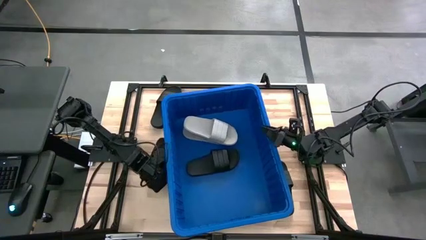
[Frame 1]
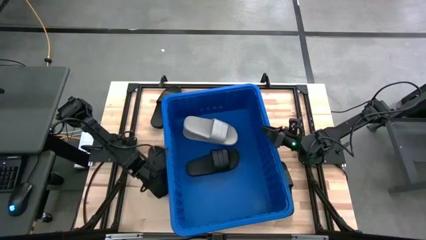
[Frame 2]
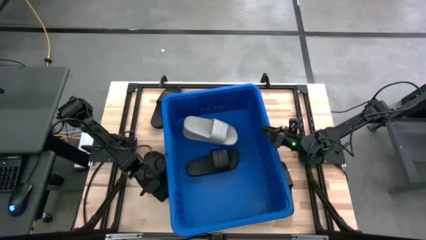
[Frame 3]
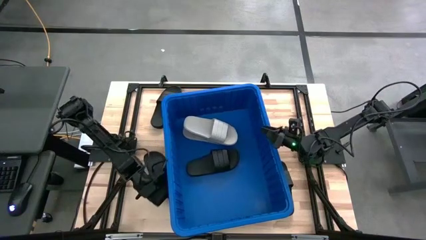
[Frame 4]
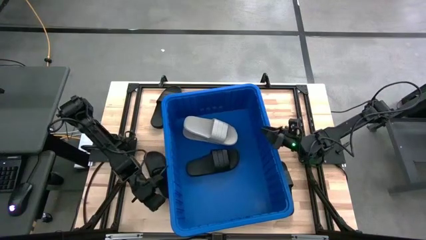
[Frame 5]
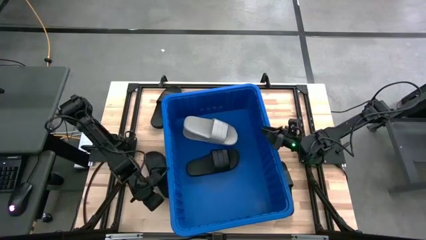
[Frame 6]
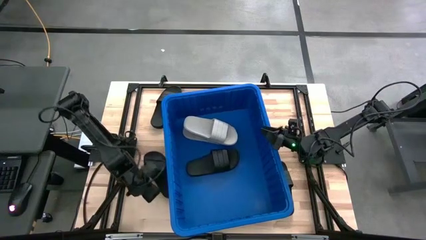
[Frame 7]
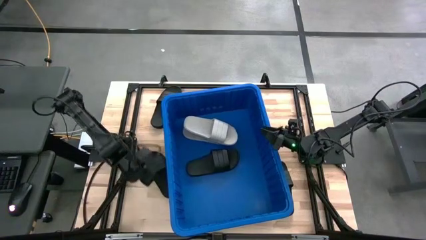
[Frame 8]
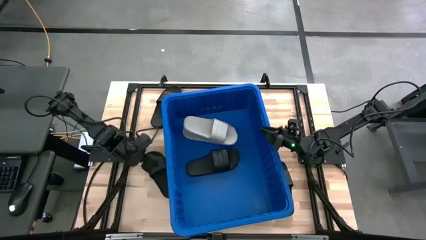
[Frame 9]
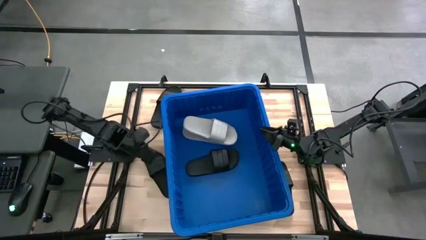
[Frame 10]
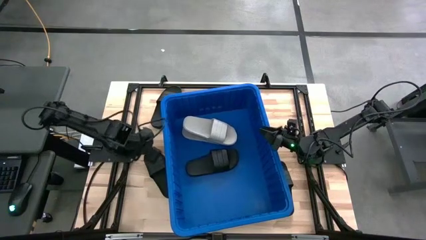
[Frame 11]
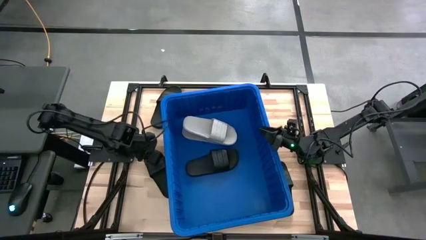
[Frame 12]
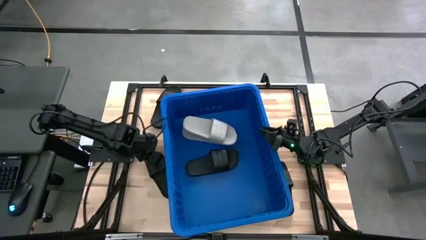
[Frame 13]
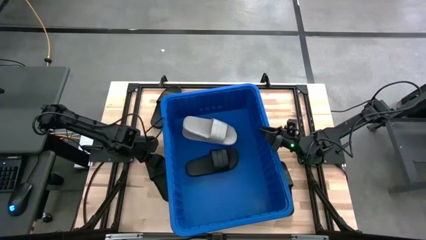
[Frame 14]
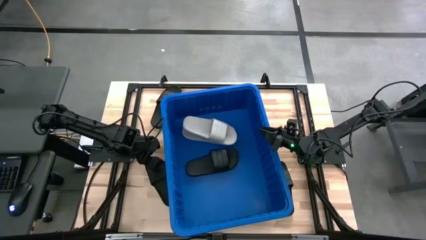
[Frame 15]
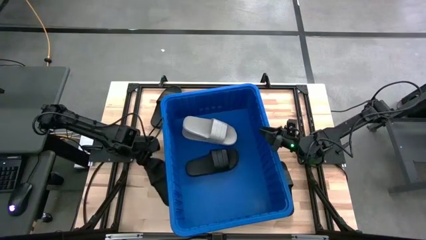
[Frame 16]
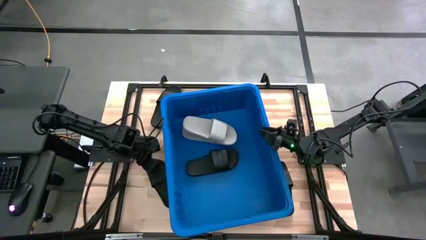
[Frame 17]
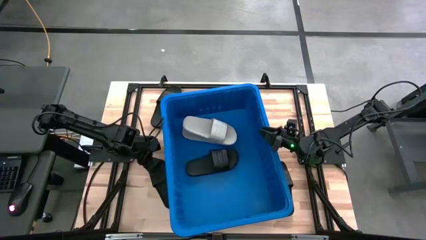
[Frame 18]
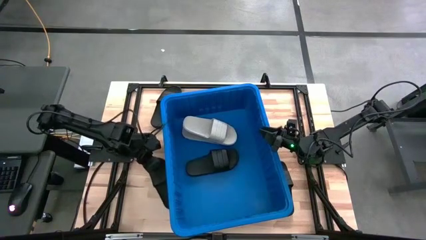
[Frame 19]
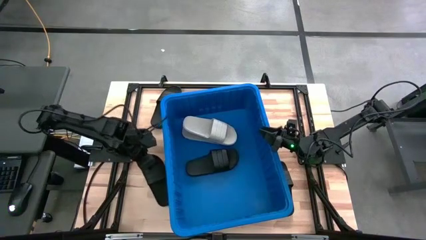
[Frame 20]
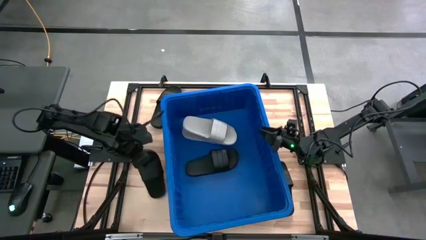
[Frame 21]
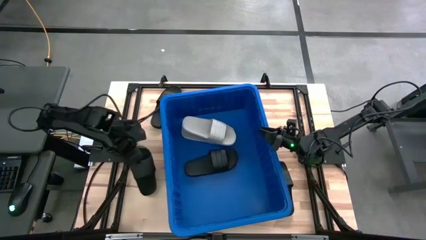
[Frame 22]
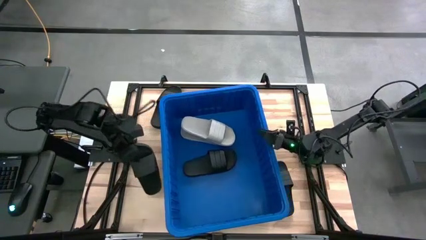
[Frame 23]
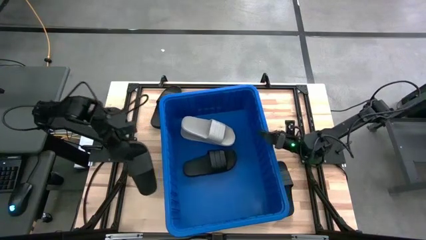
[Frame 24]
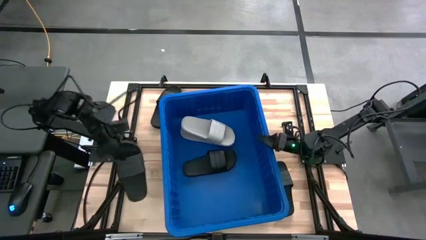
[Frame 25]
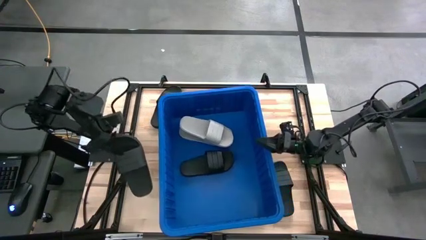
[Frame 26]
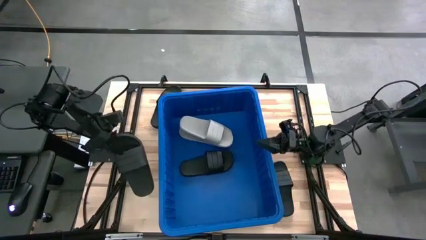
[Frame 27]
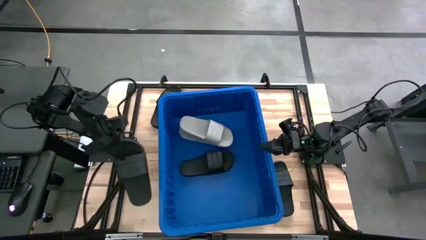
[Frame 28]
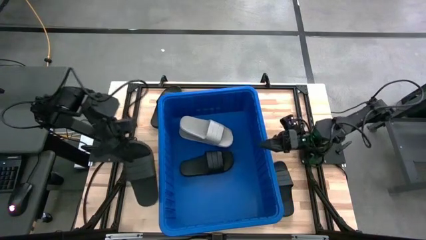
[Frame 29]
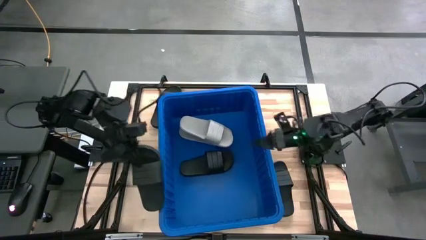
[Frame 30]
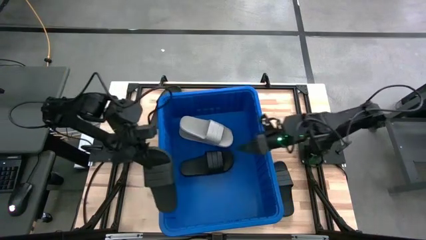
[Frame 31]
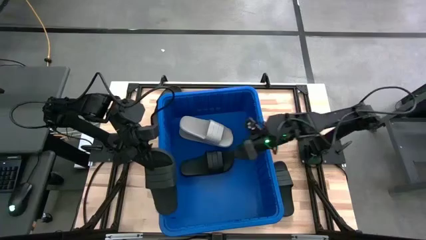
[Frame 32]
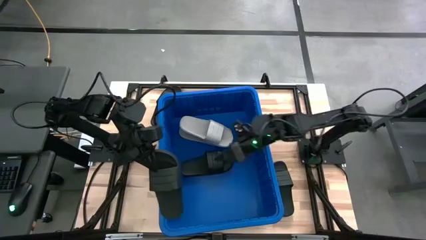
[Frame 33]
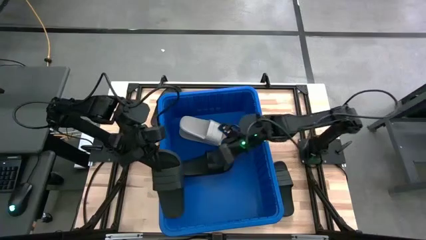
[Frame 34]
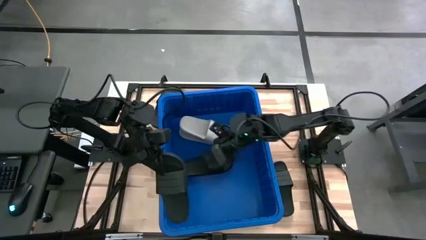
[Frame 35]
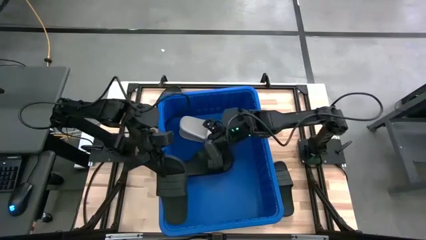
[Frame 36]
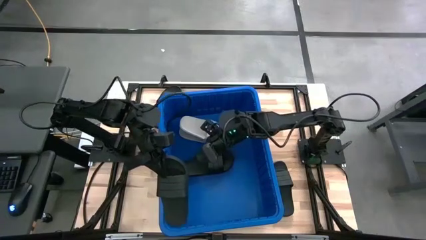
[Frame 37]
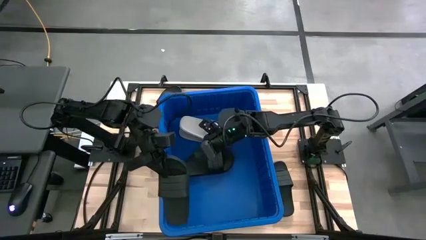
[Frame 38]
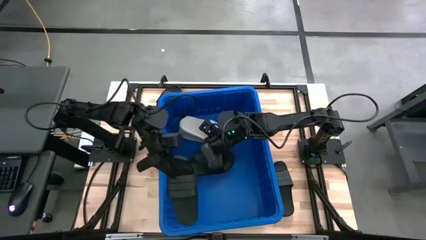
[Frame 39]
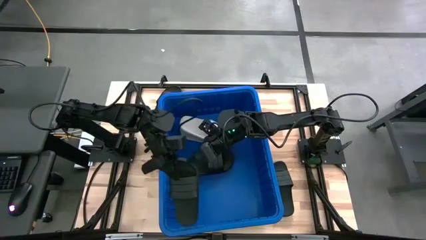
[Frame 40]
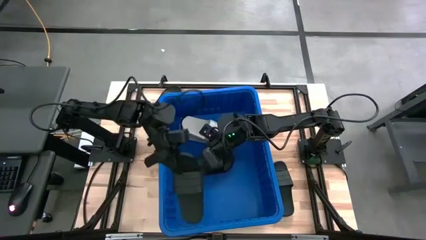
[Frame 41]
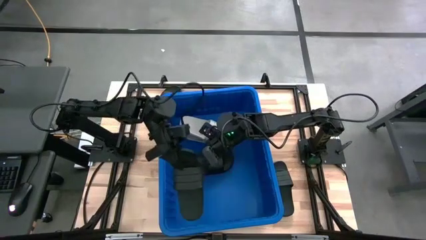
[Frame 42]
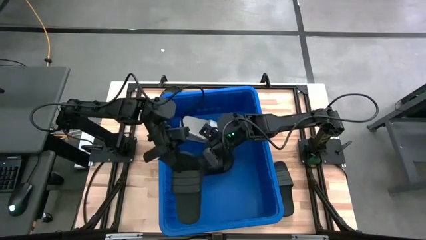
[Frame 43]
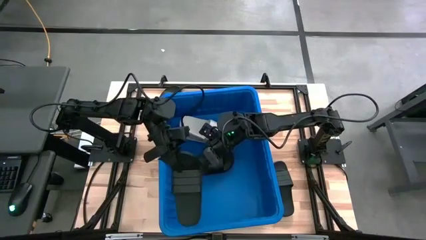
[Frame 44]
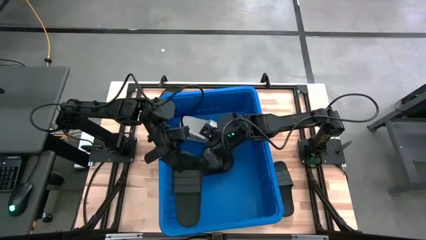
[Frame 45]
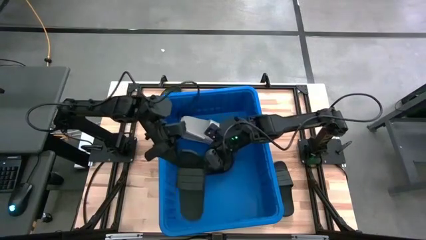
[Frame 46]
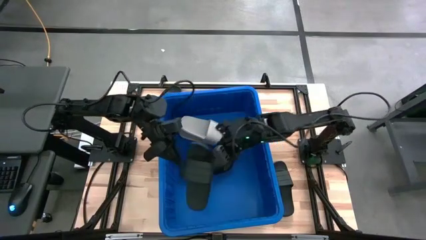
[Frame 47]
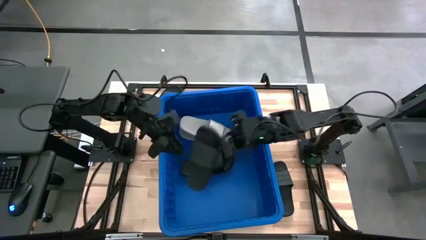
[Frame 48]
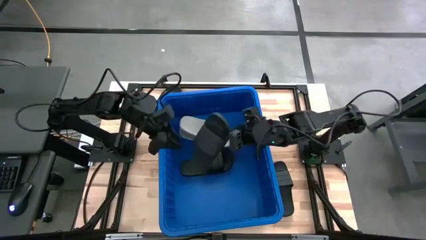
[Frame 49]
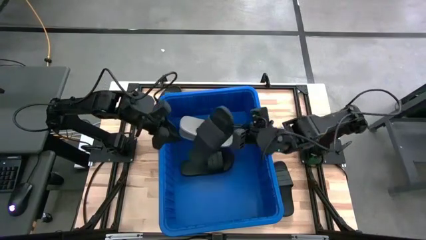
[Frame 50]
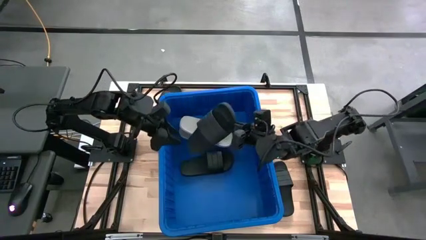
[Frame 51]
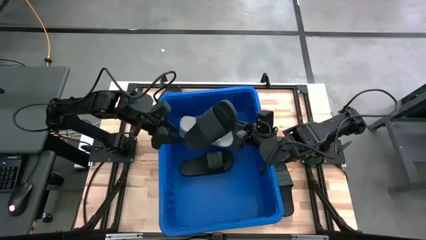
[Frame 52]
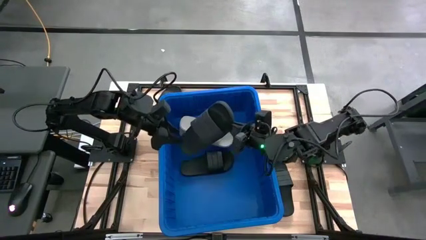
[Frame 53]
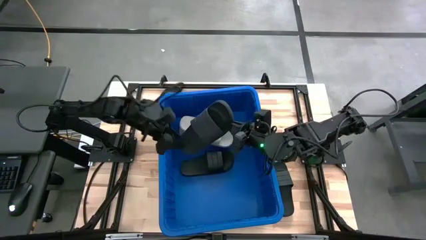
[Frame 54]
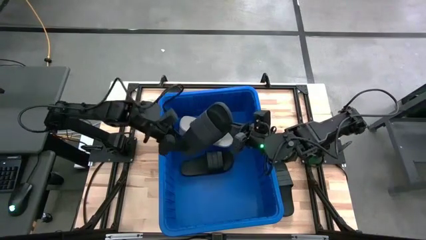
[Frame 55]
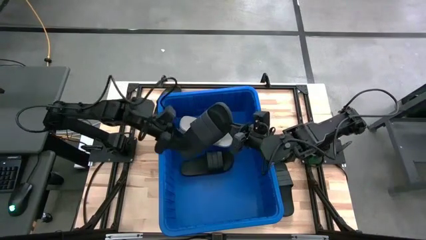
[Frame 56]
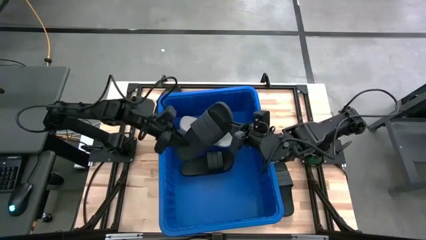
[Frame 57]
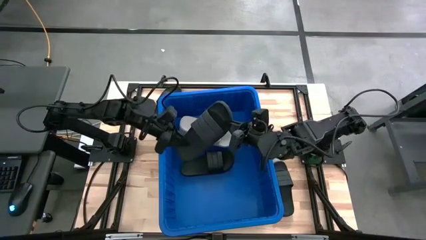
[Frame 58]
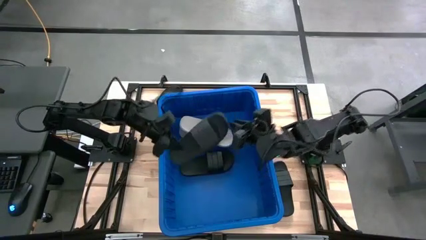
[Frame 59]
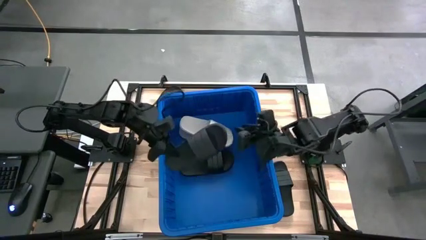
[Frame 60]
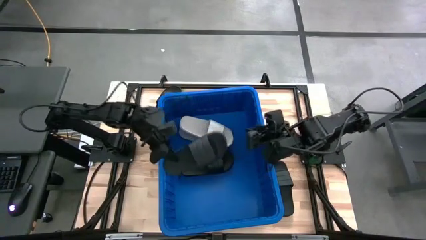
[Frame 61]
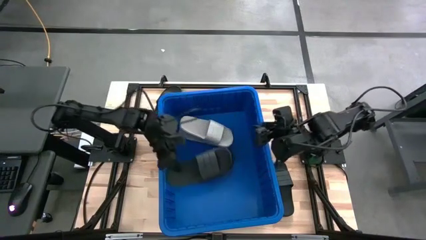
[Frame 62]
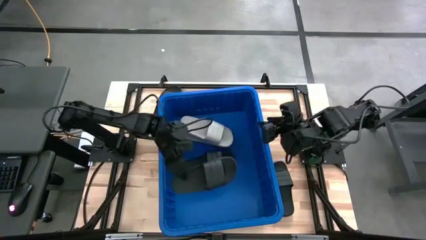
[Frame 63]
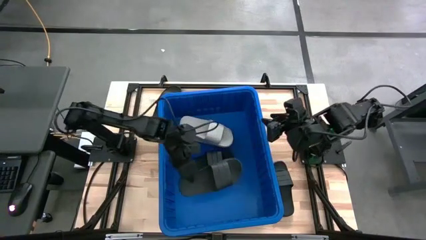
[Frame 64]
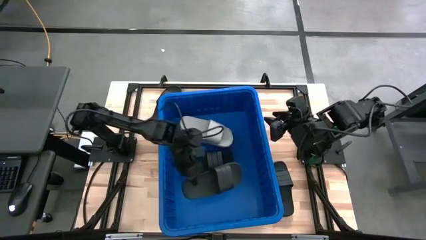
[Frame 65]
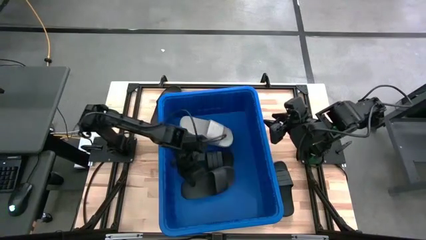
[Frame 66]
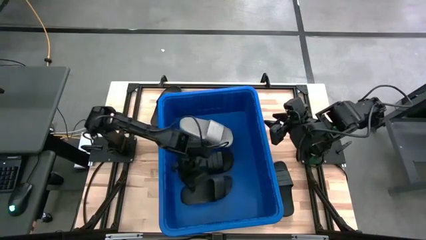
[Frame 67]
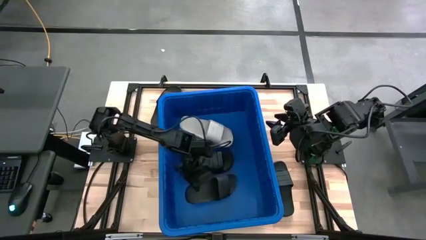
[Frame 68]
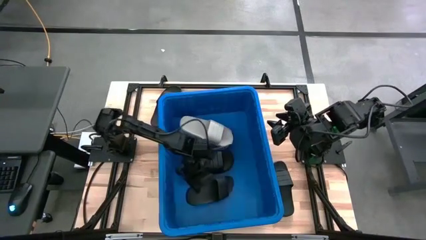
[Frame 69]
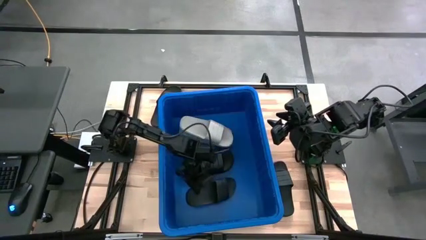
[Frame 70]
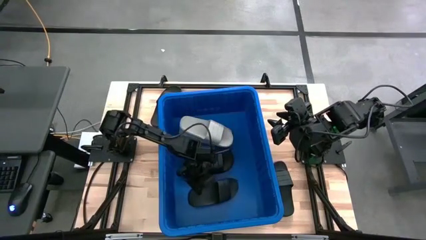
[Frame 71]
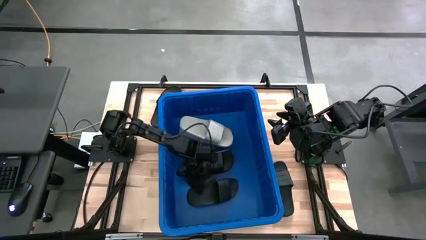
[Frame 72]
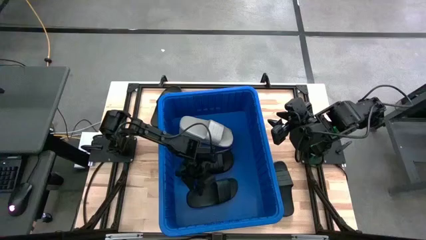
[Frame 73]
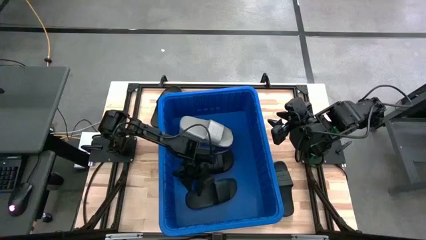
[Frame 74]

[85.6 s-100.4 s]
Task: Pick and place slides into bin
Put the black slide into the blue bin
